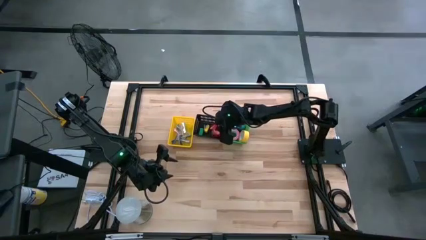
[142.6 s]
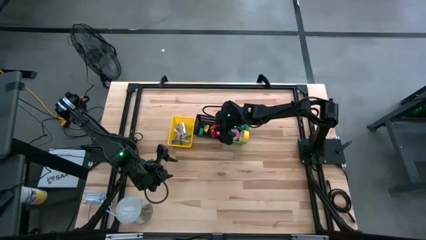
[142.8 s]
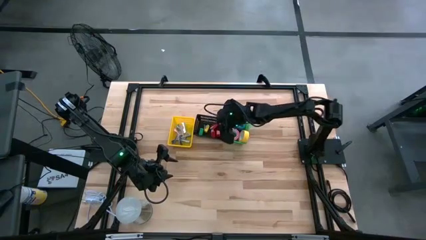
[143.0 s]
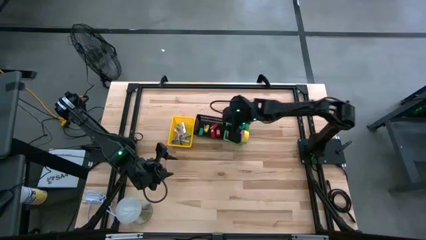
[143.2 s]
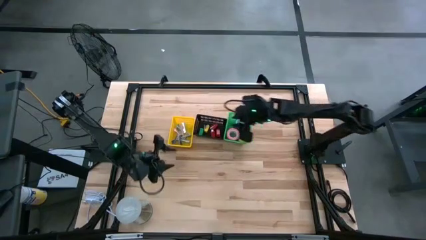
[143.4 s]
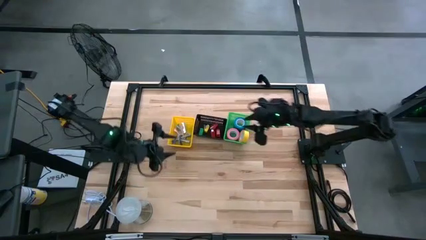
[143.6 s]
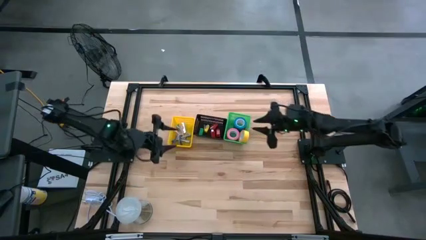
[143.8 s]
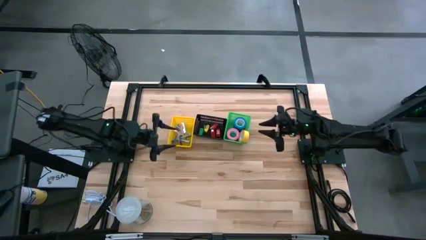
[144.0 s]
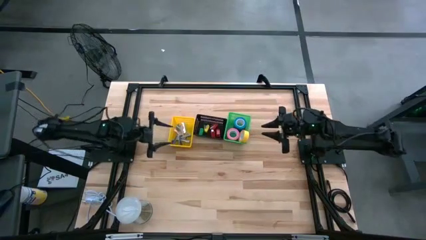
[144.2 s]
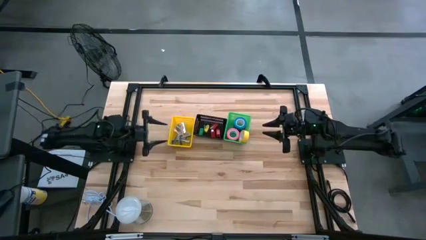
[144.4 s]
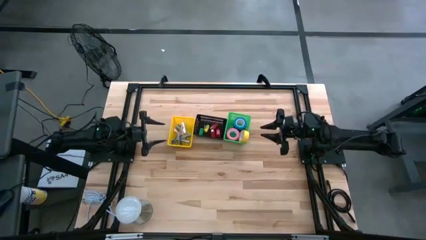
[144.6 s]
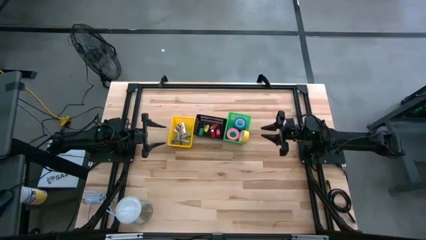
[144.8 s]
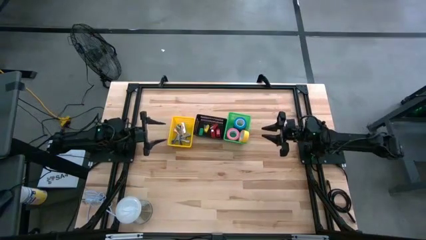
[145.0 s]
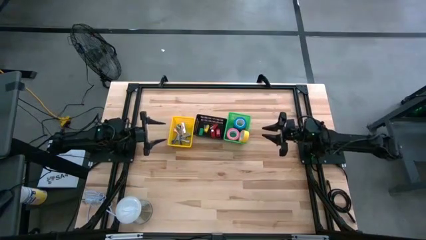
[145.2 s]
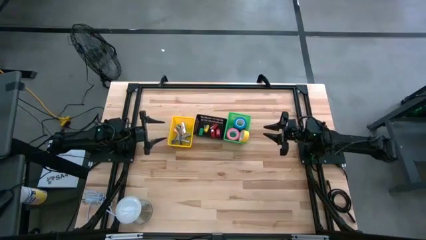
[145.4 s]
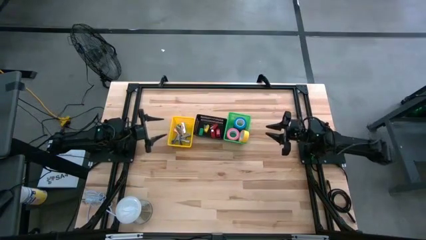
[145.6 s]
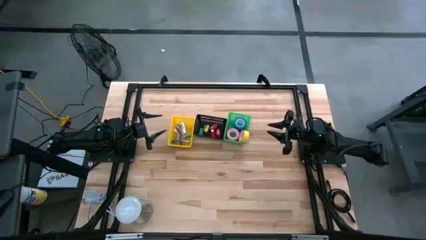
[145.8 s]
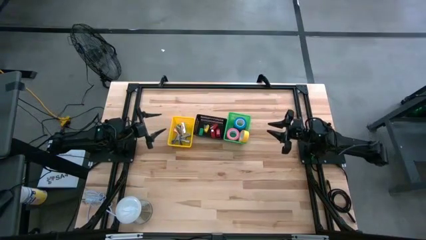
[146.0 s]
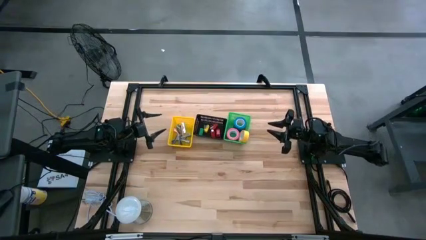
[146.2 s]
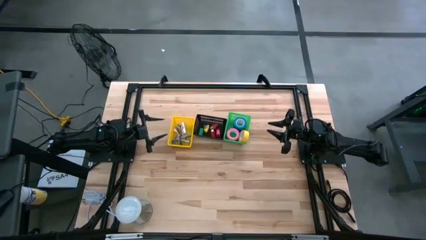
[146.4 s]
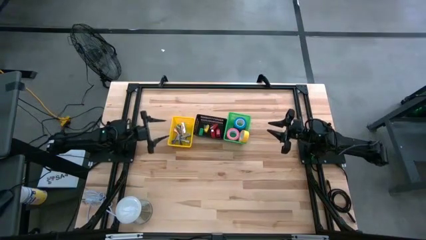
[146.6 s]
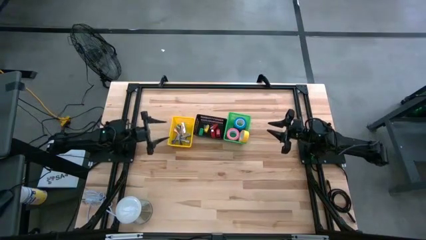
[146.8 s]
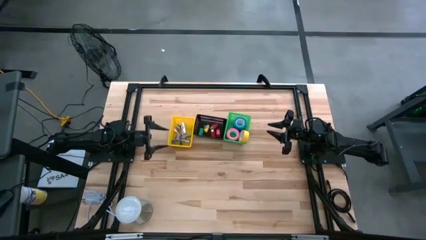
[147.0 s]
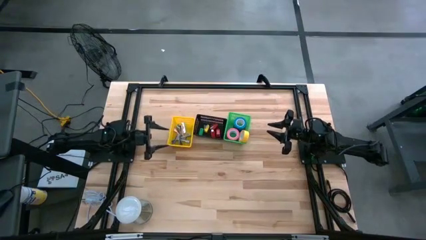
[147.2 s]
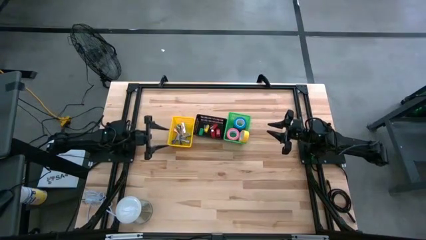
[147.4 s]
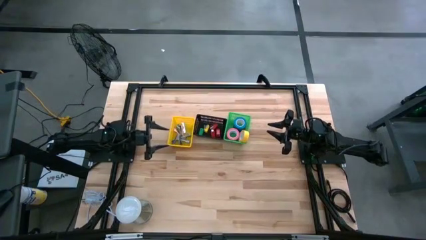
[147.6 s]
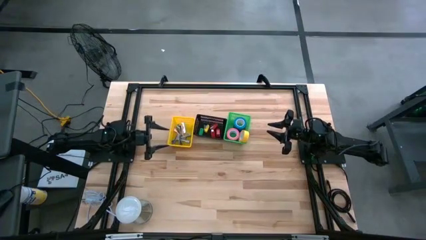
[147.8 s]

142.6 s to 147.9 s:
Task: Pick and place Stapler, Stapler remover, tape
Return to Home Position

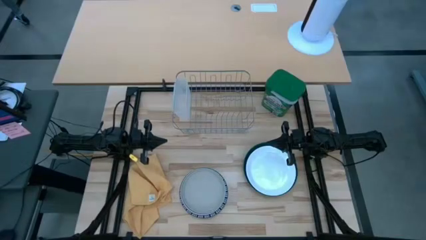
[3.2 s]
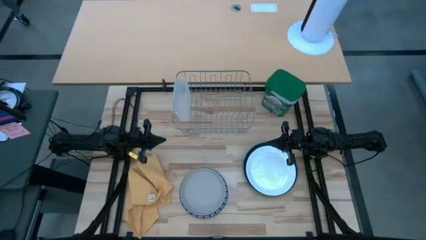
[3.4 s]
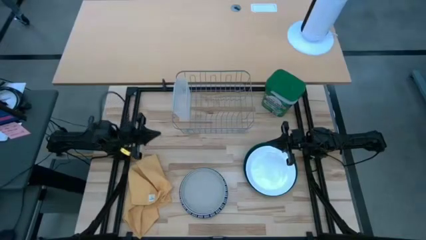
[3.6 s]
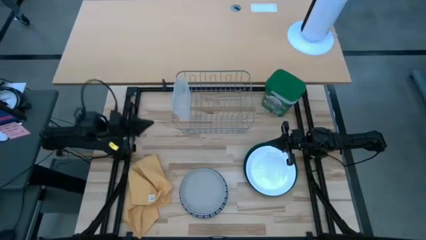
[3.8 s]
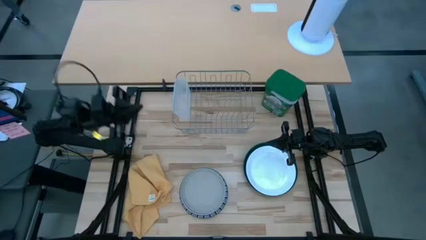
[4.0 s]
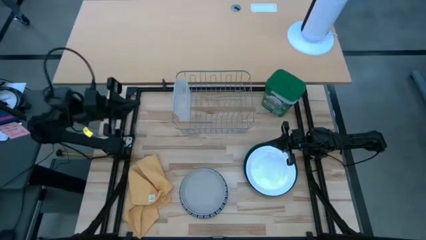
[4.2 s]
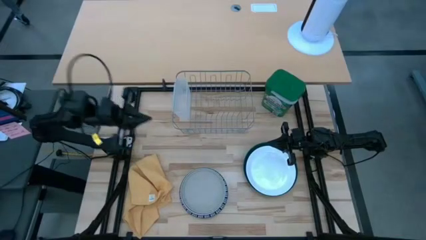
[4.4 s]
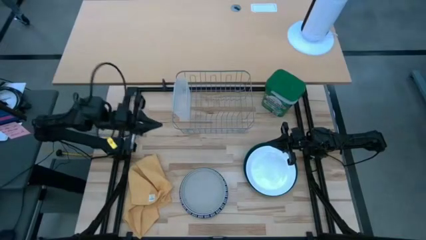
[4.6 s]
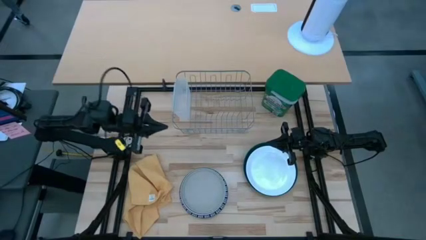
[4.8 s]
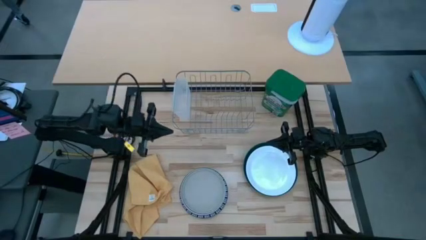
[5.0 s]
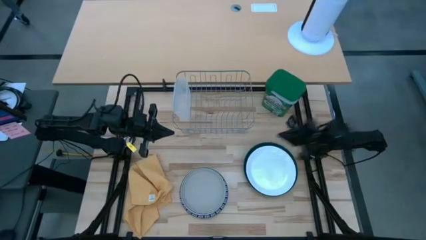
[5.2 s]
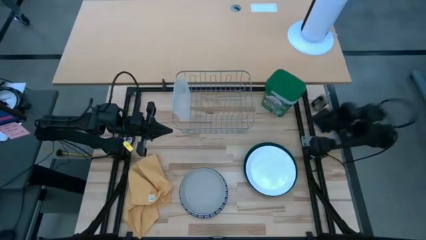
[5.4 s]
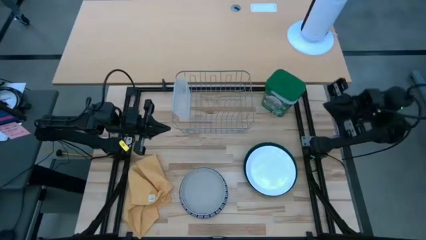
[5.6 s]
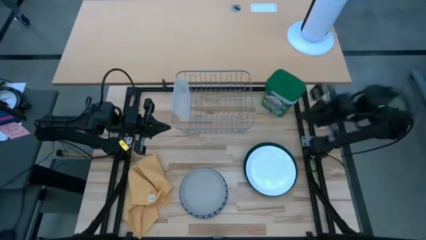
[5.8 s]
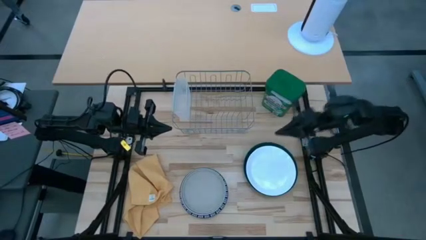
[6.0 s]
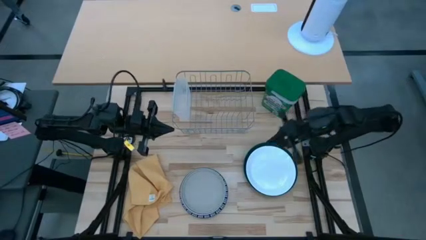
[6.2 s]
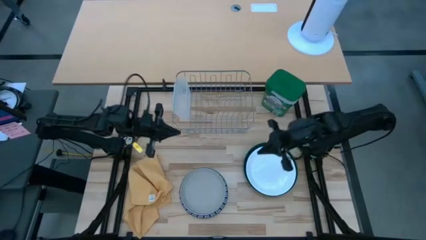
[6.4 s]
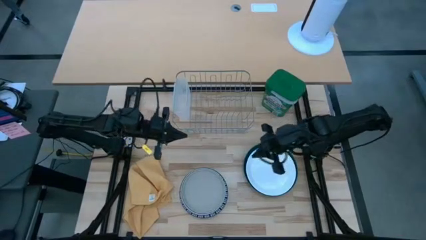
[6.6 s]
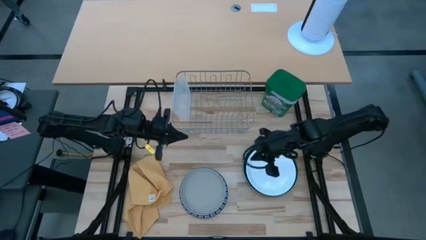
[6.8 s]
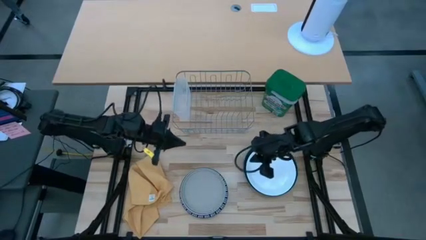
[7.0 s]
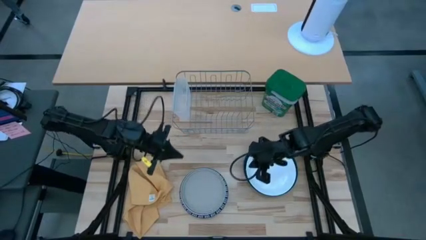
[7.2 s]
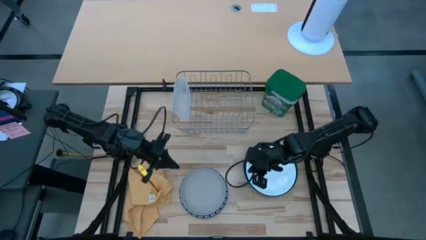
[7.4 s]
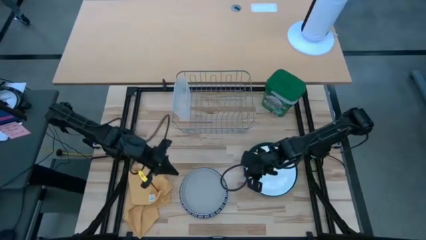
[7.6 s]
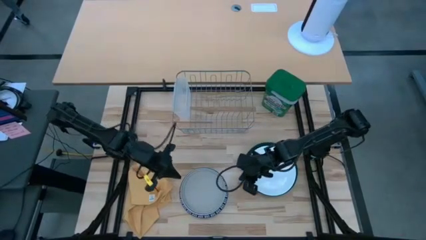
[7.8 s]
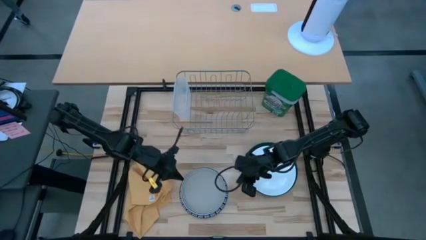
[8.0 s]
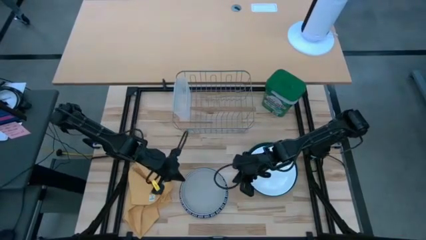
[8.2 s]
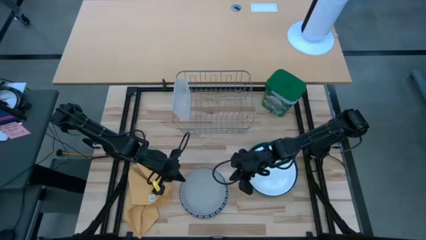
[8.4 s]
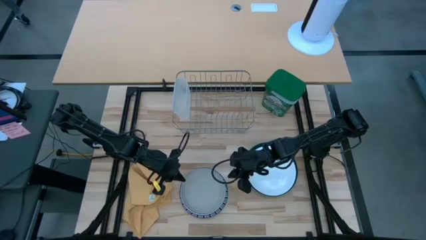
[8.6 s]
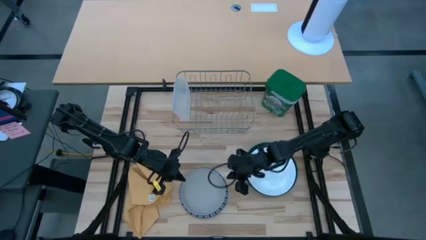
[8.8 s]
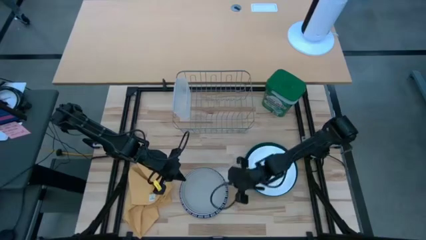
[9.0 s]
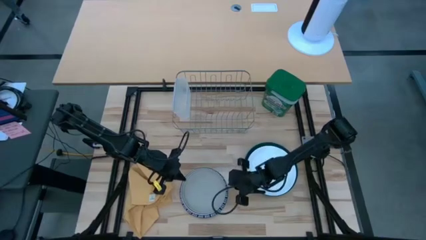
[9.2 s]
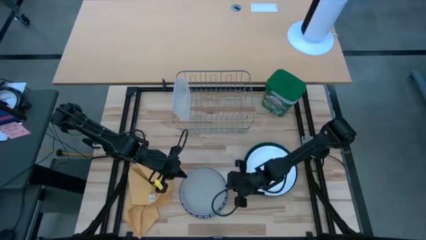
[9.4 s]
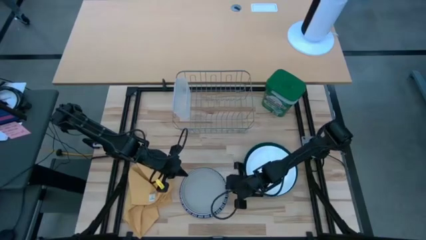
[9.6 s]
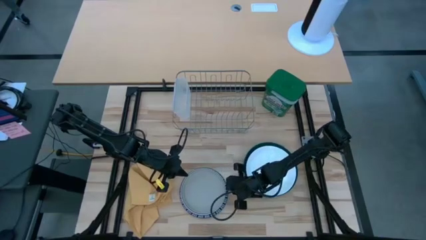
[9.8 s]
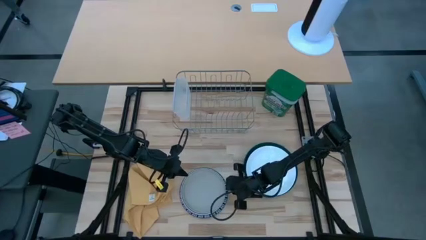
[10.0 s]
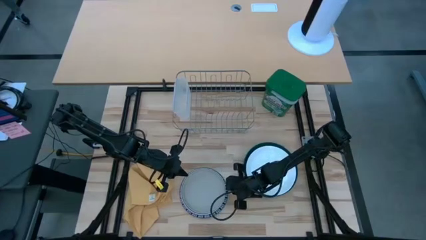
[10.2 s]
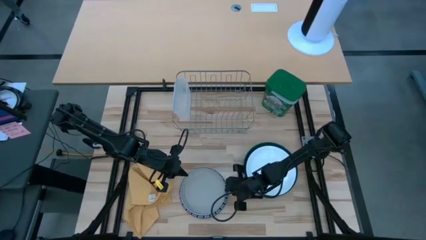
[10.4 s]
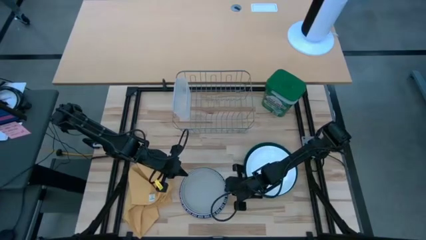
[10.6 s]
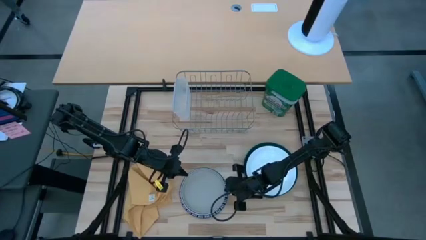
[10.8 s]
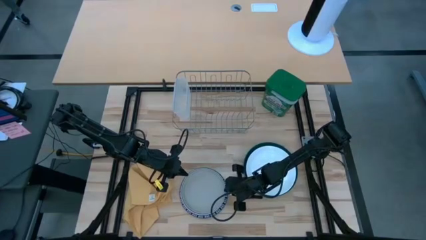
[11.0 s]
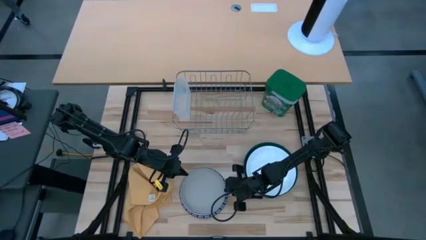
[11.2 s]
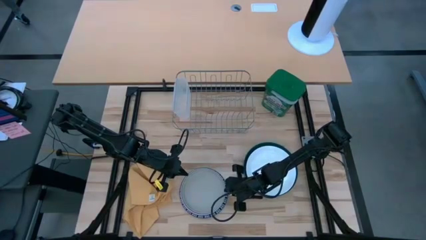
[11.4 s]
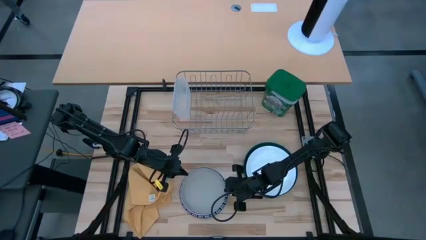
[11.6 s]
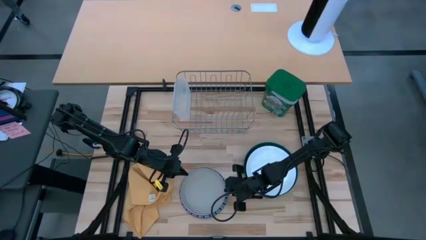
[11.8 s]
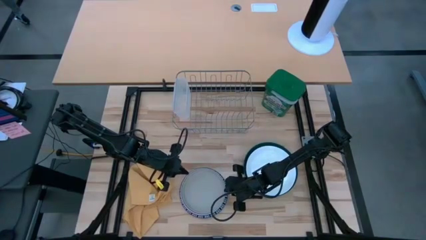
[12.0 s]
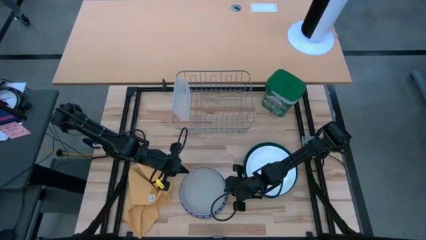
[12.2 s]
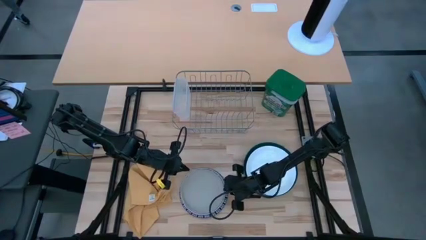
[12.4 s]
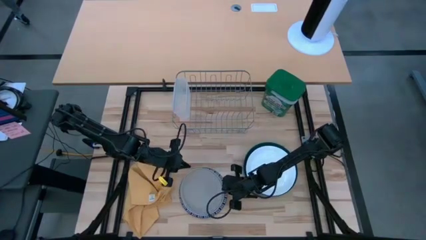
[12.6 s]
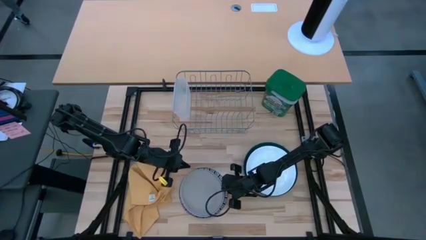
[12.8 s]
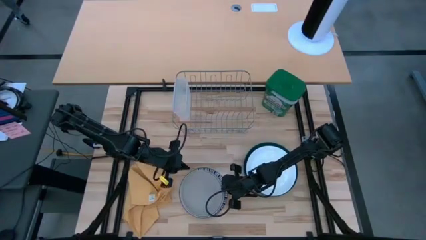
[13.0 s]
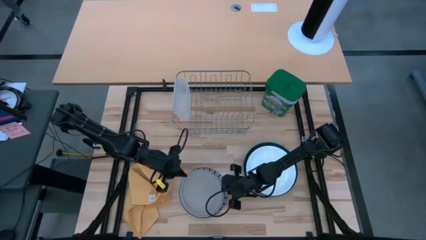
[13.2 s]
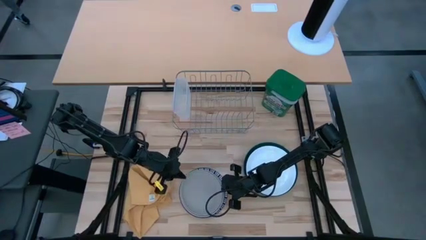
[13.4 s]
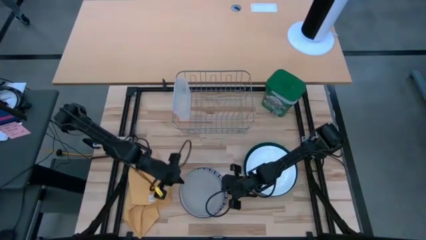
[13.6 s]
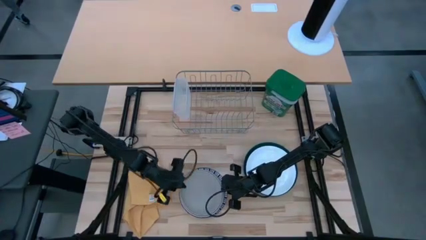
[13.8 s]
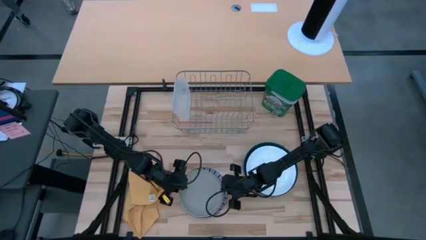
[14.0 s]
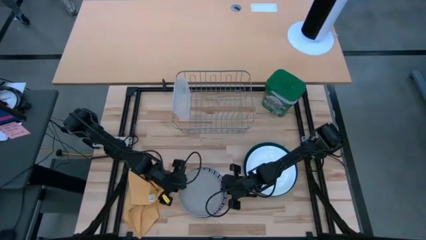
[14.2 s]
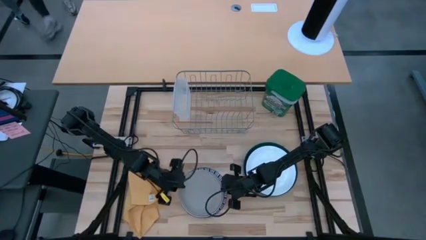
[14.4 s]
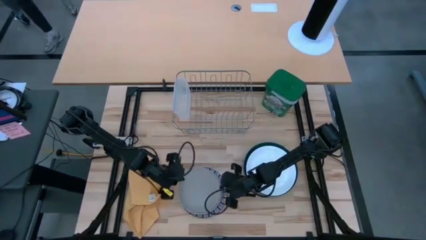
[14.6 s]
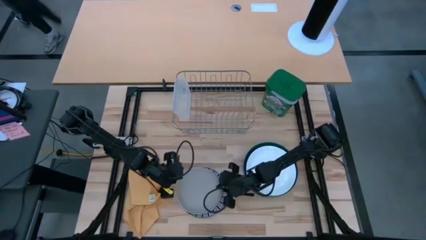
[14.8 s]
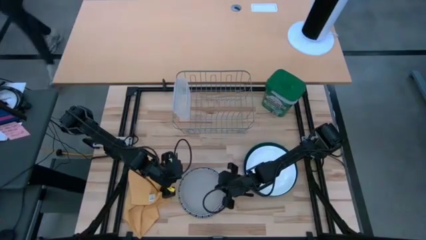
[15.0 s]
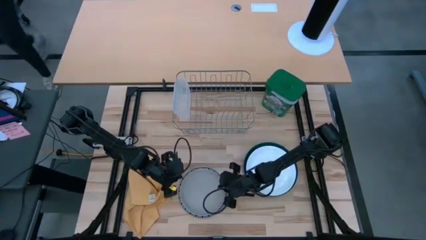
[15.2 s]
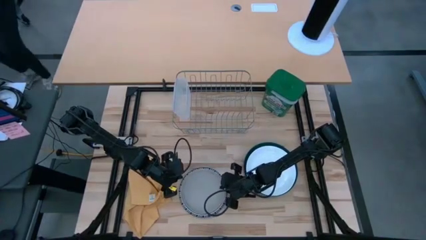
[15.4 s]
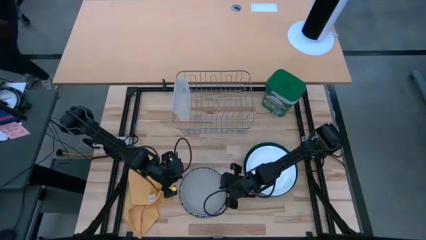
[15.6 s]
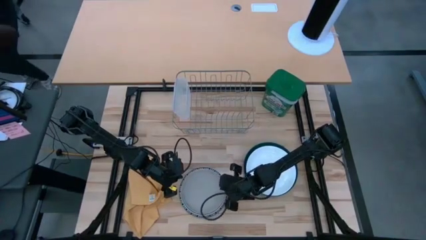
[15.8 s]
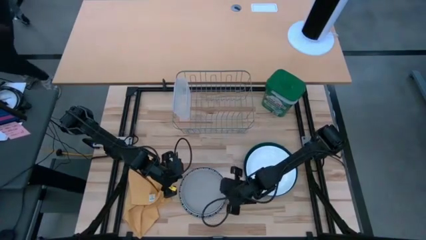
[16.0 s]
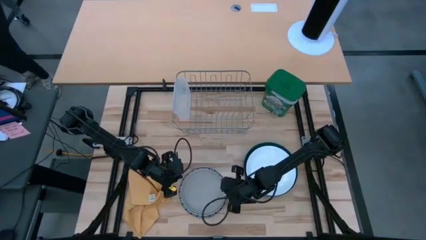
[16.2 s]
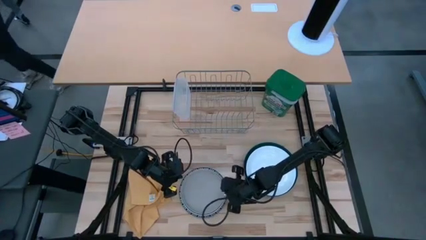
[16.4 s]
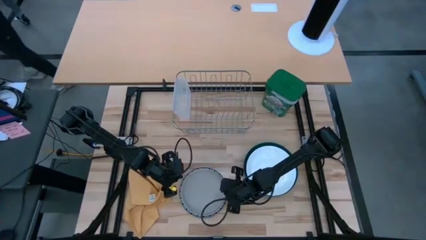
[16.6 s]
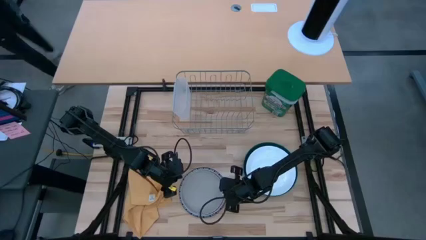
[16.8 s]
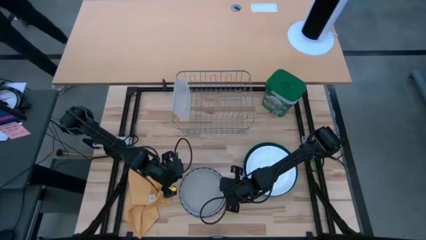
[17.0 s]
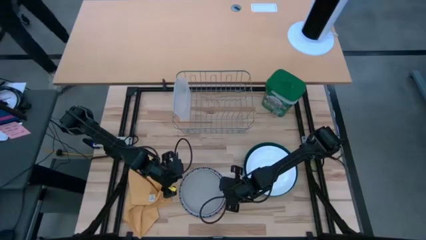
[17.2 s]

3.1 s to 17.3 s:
Task: Sort dishes
Put the gray plate into the dish rack
